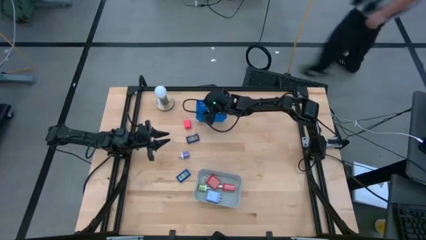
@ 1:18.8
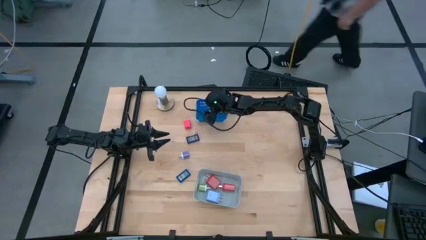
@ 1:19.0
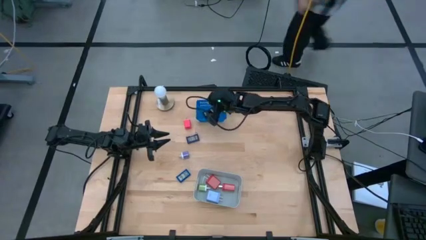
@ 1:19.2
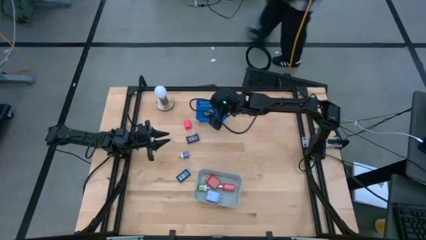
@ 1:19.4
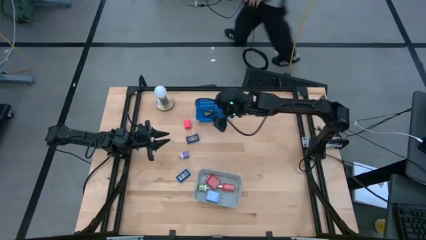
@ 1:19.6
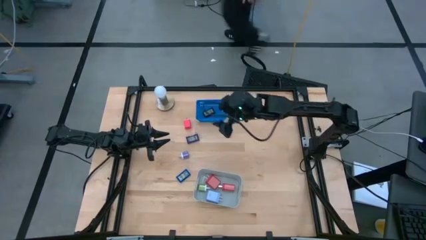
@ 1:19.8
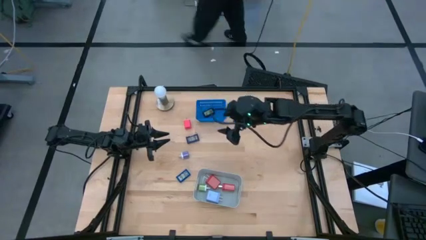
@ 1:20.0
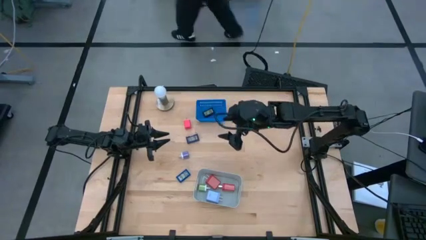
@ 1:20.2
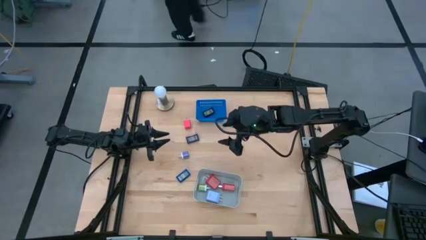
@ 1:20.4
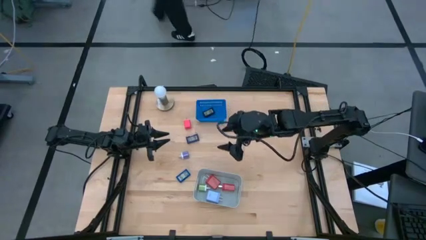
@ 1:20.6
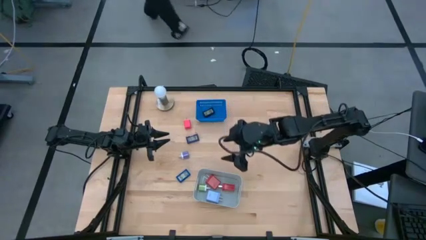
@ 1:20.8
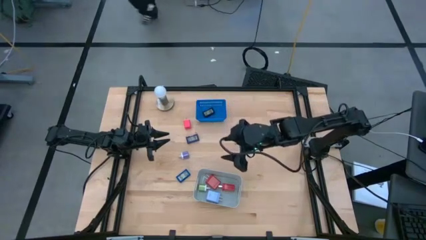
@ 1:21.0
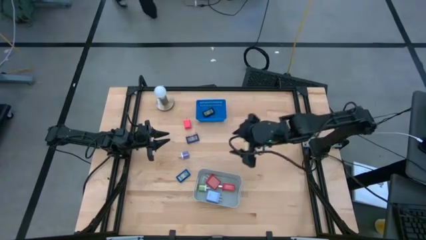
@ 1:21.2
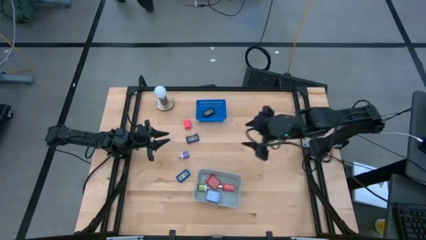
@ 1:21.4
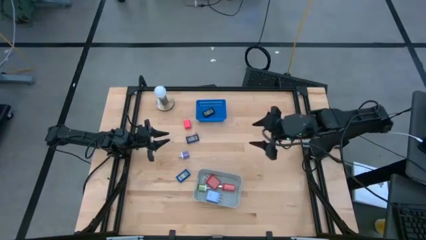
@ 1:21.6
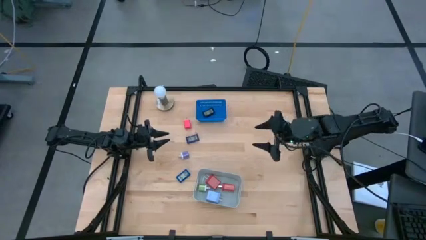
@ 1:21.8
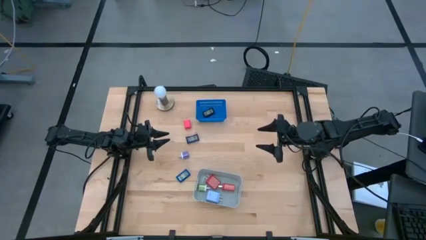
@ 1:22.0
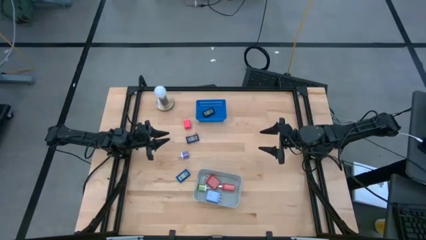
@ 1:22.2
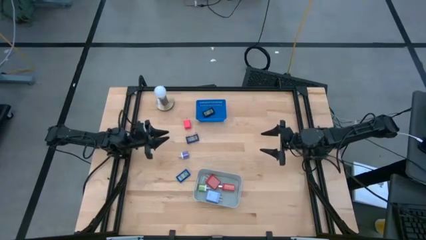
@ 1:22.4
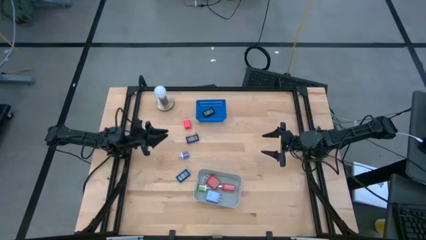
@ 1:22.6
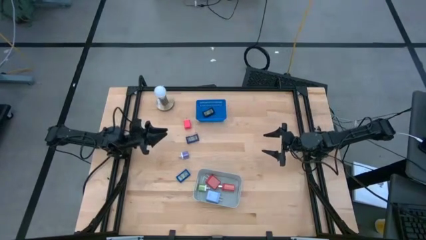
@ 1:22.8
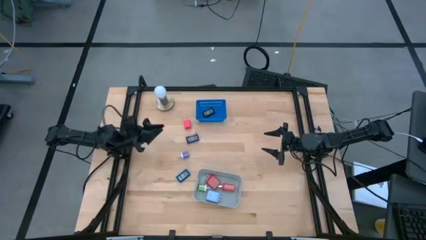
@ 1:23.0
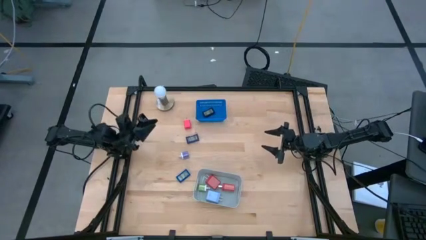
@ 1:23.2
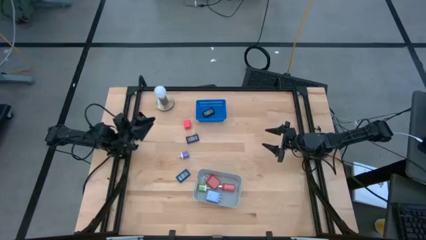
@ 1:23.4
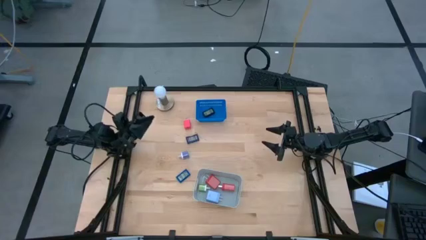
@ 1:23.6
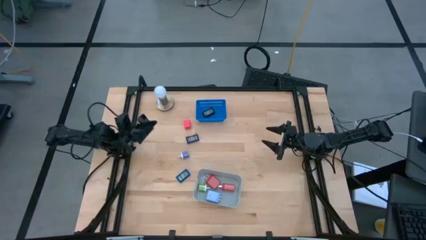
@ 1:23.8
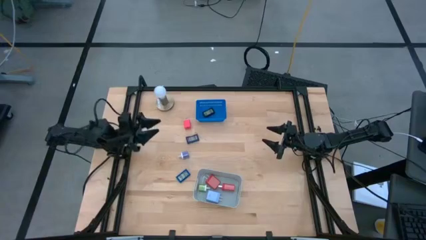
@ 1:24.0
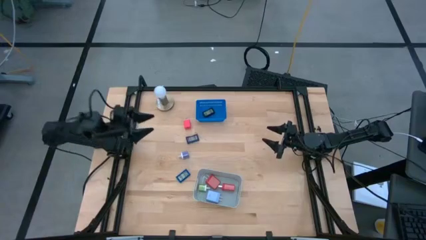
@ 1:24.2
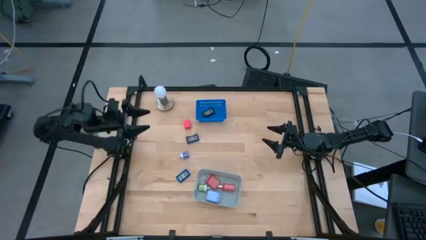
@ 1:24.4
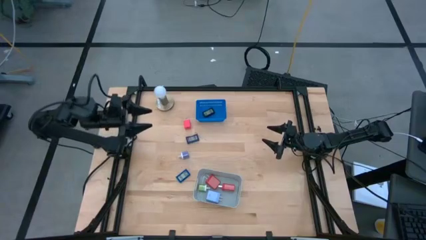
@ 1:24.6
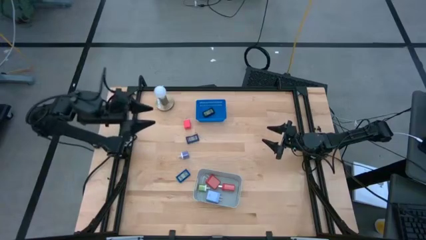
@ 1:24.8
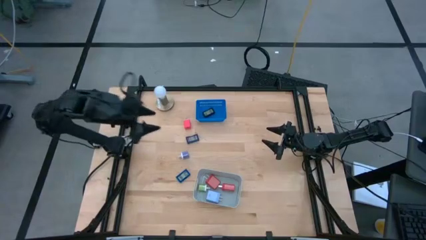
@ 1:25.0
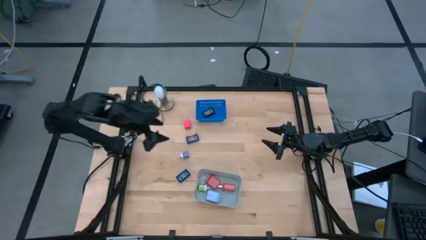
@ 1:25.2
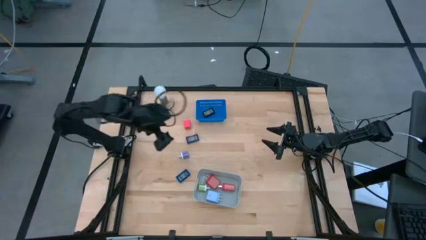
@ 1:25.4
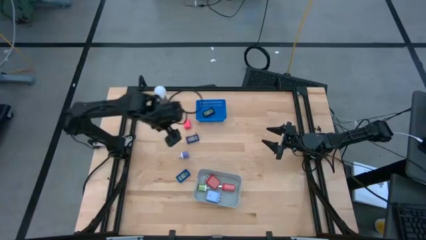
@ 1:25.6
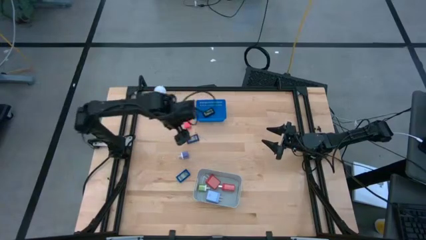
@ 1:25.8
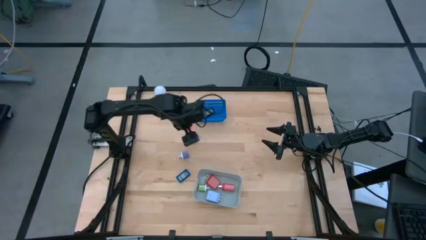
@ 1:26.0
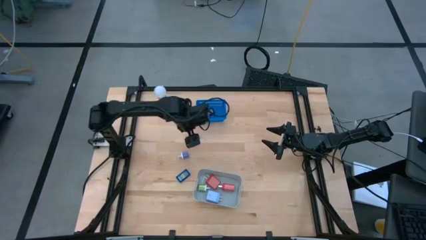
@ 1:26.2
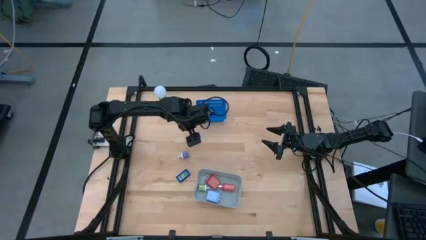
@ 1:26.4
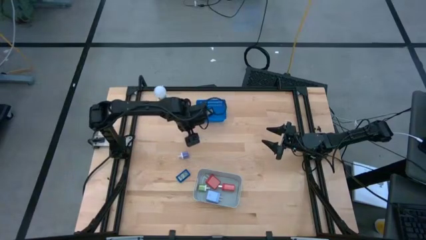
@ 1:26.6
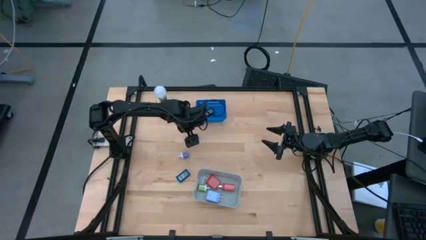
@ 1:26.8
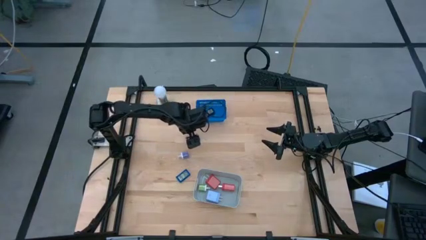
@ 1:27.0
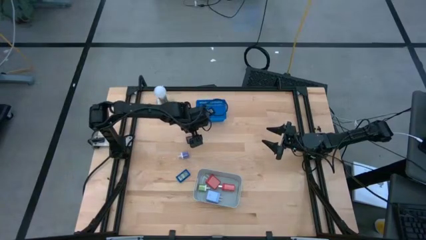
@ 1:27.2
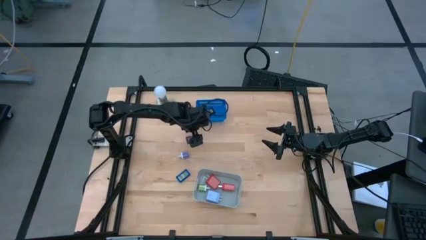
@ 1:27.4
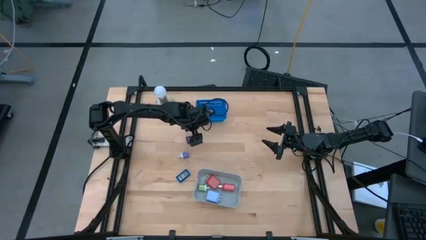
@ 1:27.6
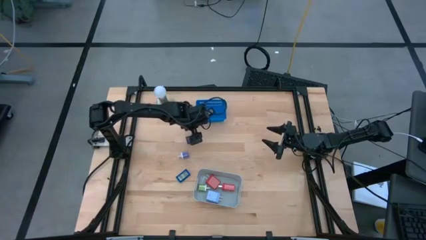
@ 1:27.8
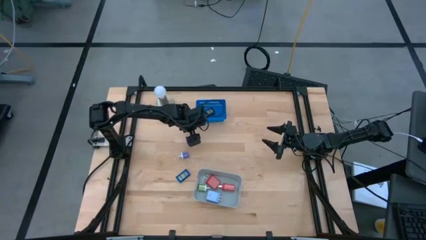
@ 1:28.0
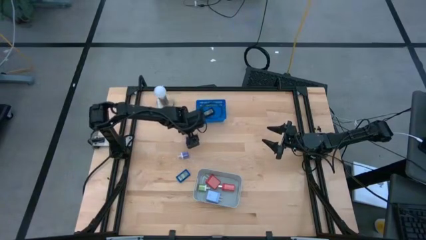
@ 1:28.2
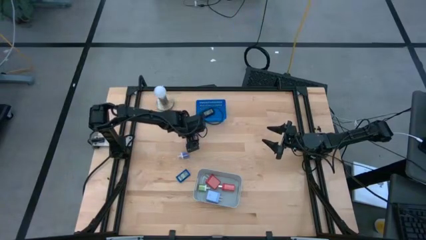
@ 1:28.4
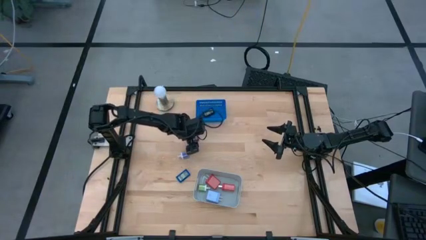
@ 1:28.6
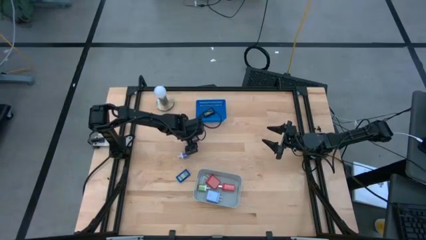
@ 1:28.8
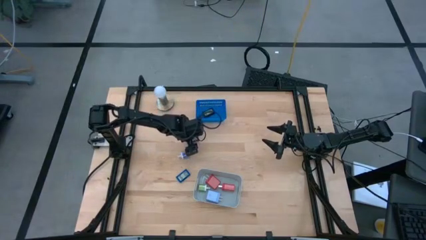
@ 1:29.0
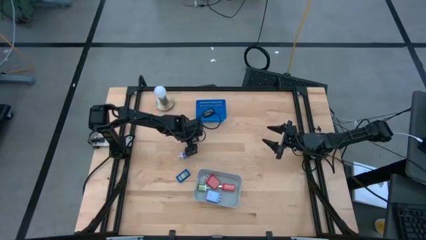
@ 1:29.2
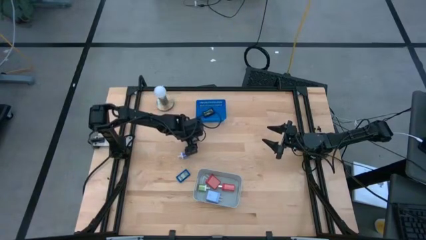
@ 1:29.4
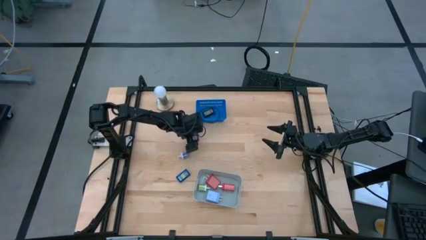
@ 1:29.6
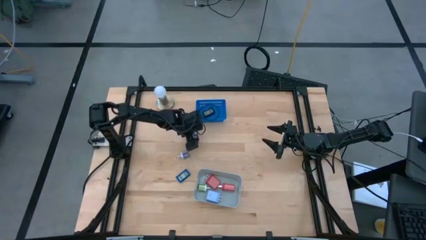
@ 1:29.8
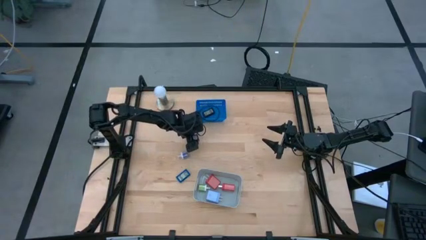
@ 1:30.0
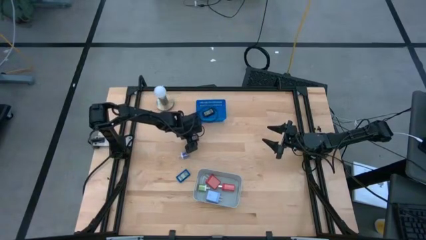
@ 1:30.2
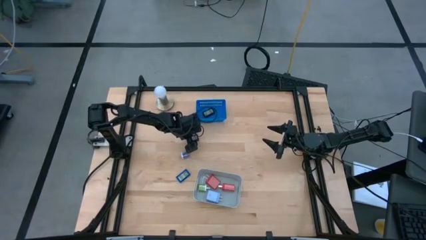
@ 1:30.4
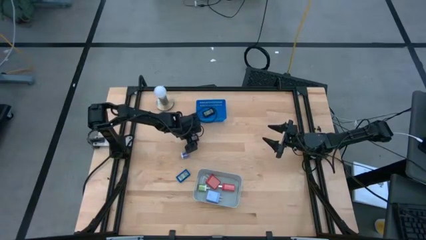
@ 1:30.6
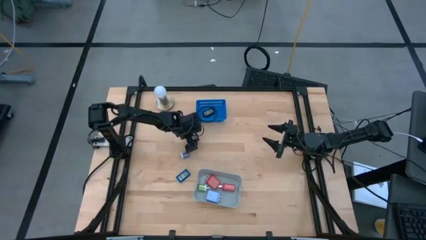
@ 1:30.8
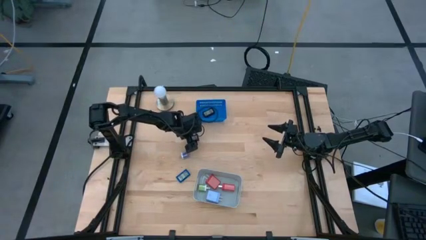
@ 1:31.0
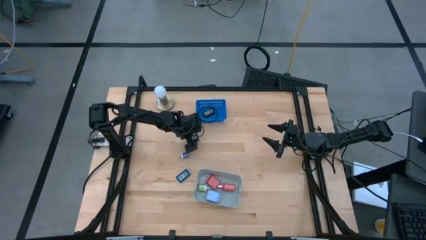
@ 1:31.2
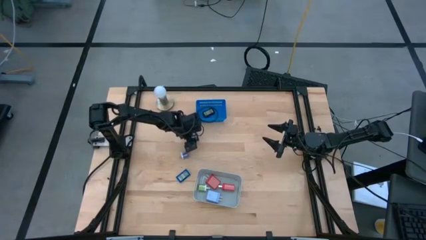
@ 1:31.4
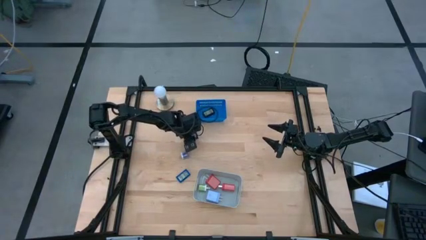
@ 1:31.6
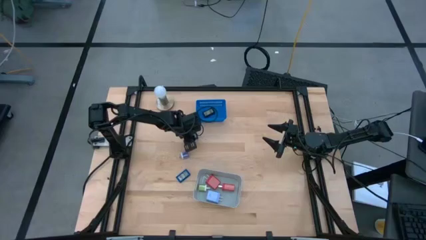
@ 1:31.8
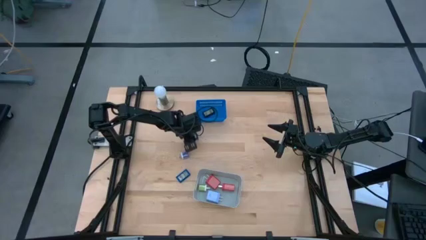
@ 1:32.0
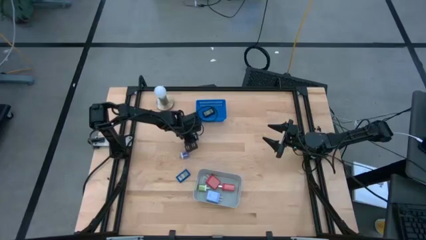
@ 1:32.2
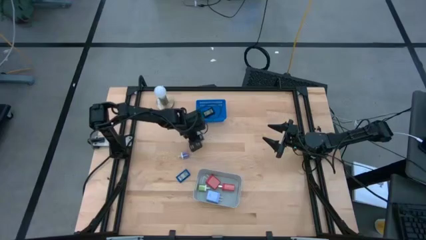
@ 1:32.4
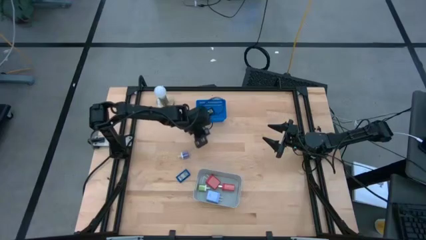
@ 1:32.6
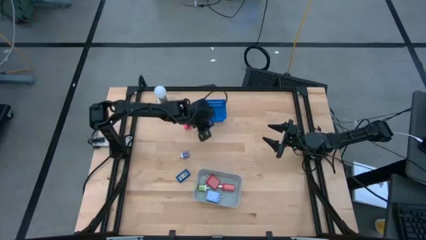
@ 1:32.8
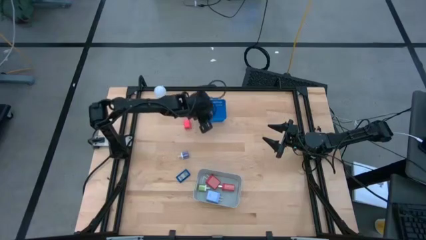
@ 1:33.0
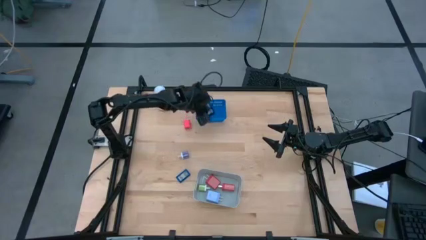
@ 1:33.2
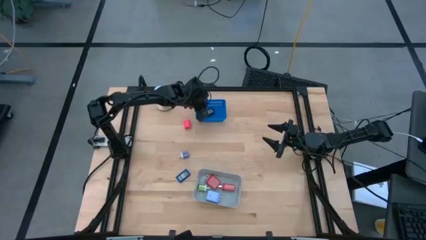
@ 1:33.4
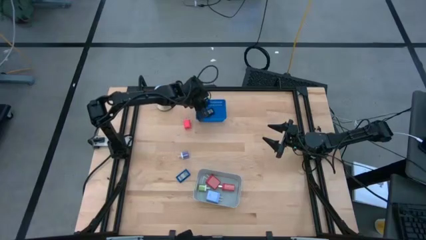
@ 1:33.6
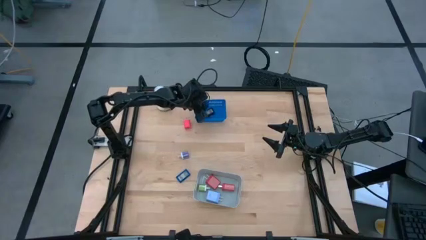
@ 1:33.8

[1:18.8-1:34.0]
Task: Pick & Place Office items
Put the violet digital clock into the blue bin
